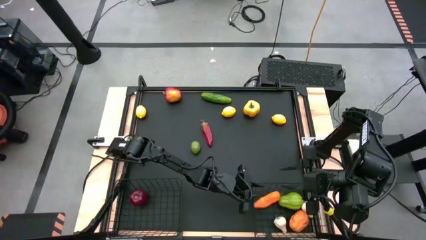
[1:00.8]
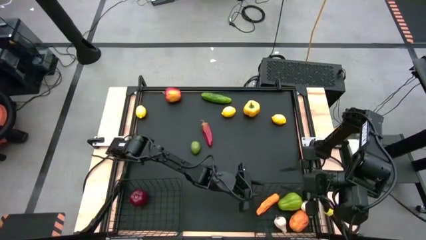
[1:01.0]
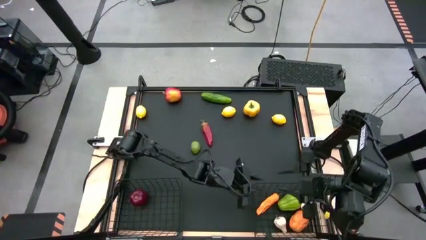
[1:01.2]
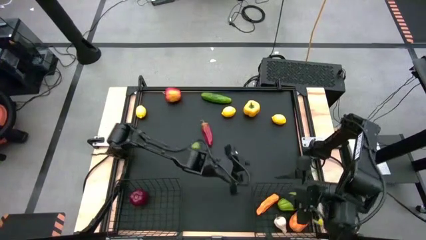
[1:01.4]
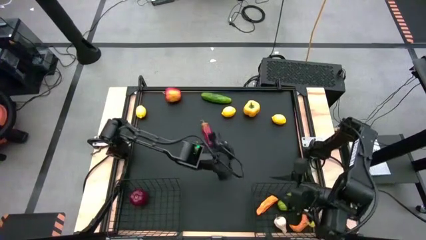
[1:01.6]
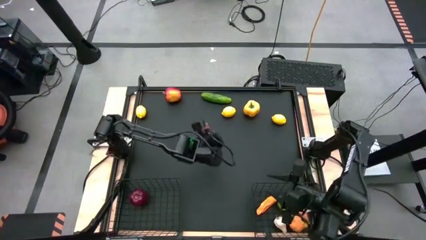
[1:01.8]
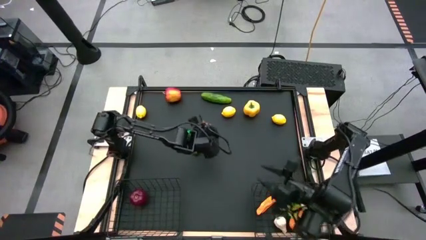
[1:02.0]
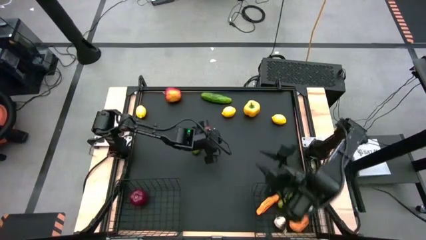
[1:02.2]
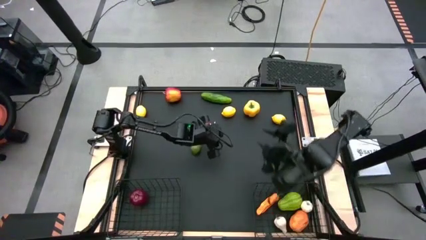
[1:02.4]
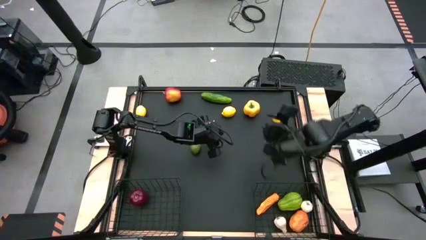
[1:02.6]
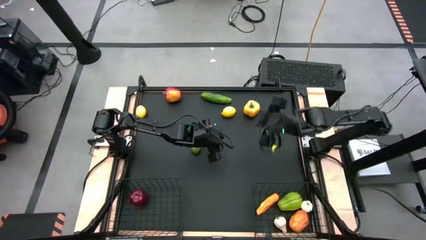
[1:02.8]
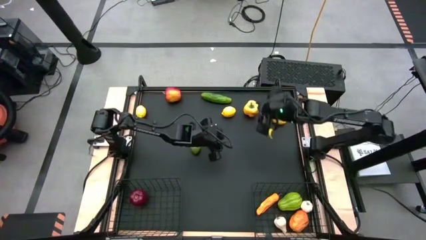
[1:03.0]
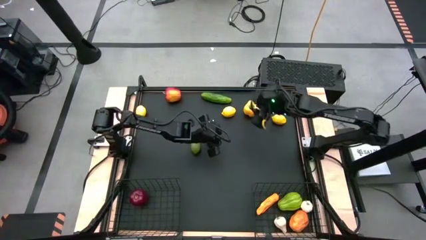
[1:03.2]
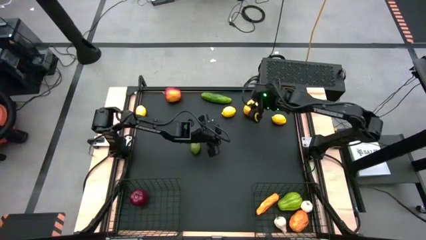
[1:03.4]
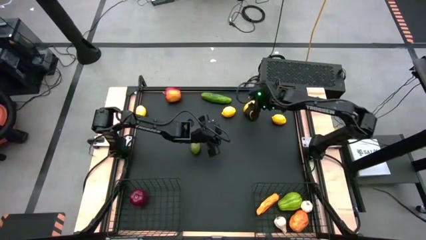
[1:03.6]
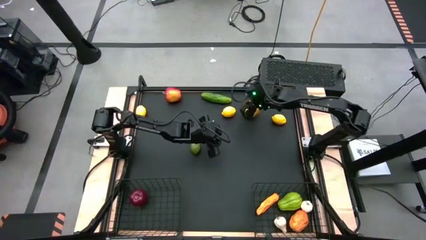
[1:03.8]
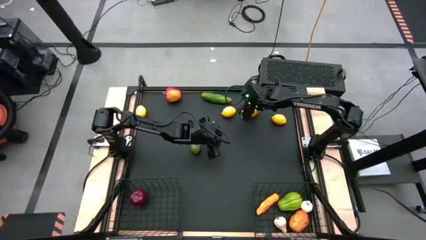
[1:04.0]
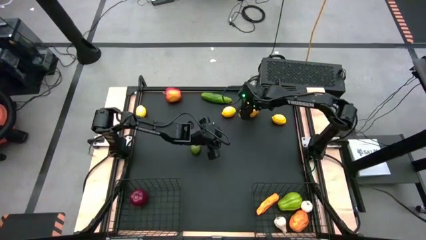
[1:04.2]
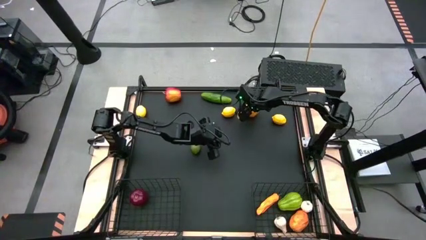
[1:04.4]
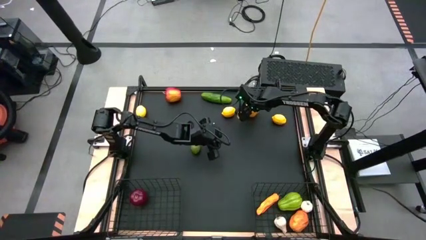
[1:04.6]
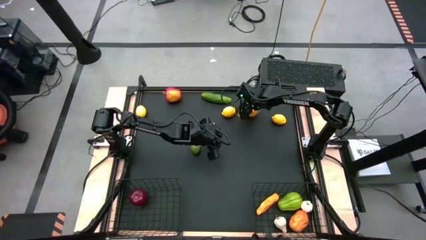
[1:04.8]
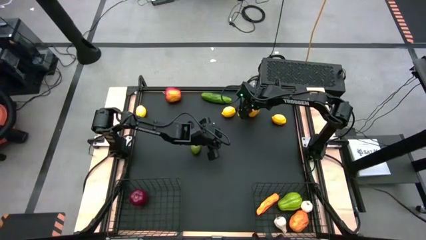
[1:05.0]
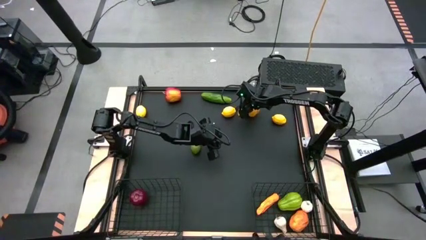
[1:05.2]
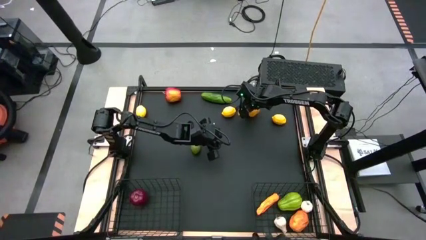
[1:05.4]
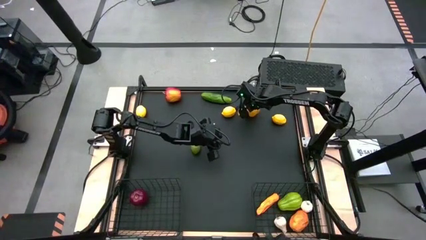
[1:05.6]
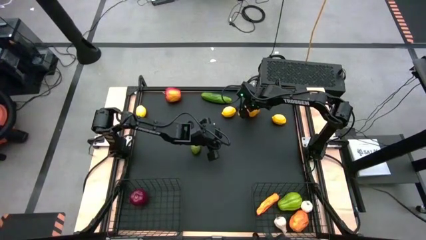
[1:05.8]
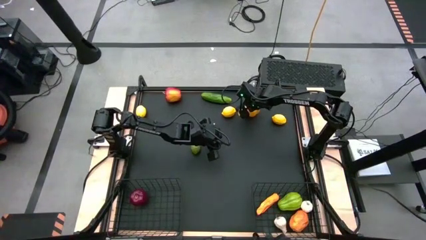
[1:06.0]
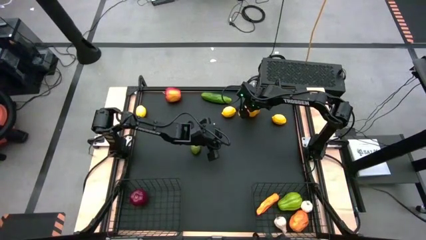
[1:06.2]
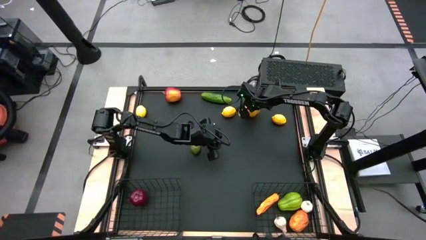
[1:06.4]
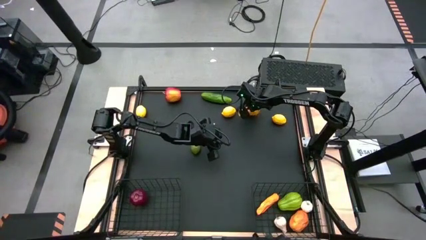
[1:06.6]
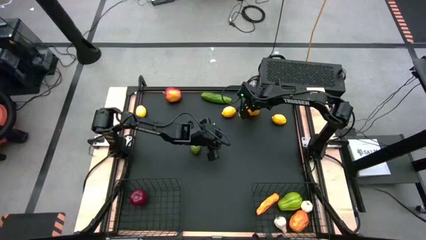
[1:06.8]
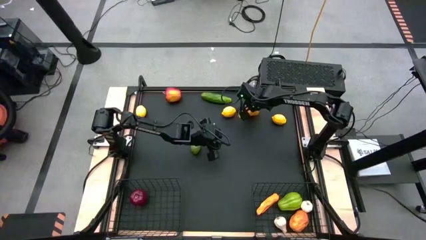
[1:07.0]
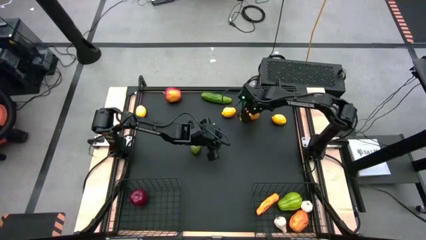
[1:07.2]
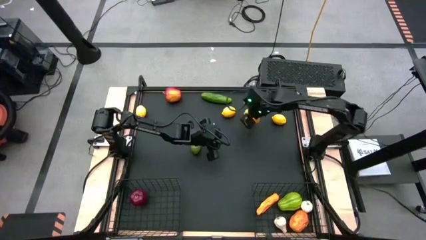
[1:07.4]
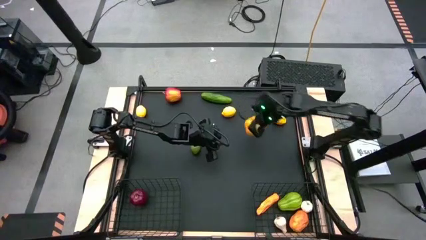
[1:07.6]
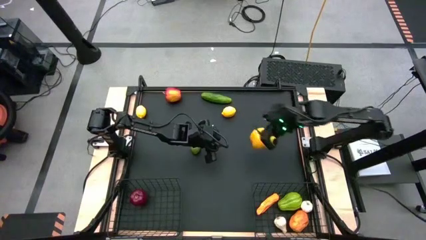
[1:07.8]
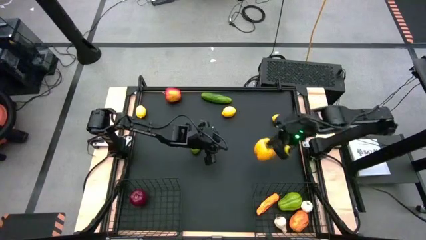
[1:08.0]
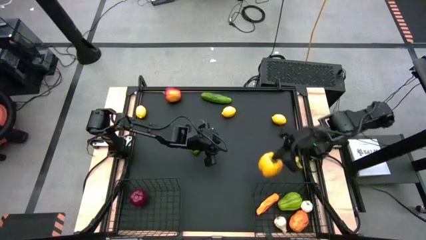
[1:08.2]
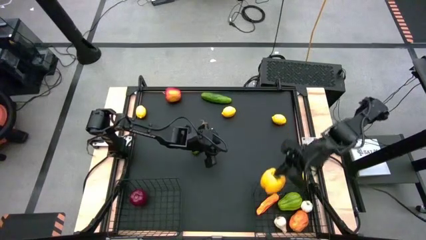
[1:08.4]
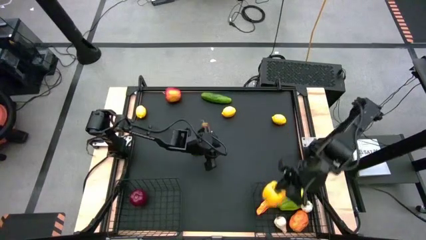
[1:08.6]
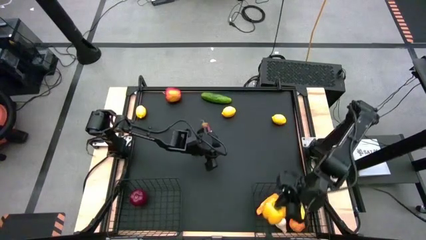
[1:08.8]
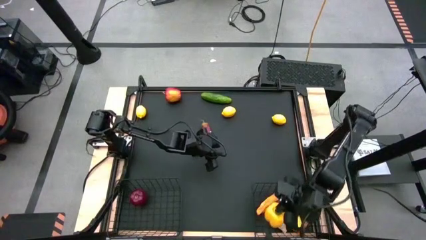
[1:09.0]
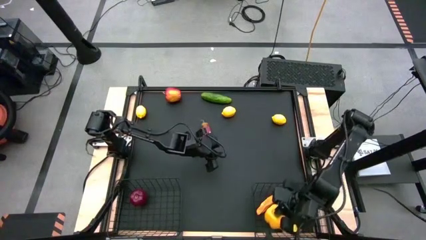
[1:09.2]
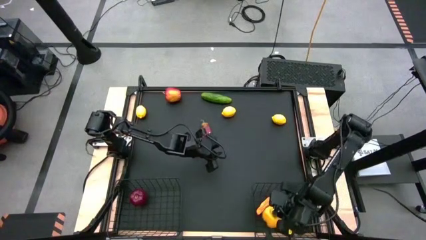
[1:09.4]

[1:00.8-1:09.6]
Task: Sort produce into baskets
Put the yellow bell pepper into the right wire basket

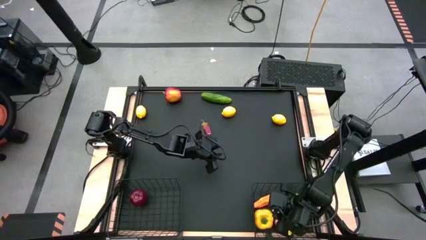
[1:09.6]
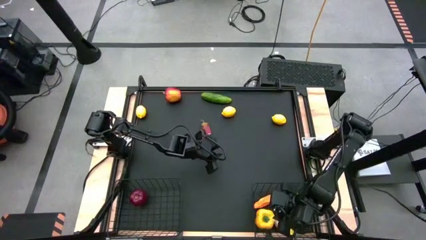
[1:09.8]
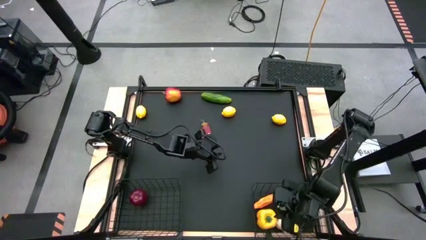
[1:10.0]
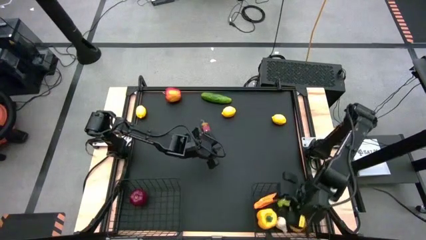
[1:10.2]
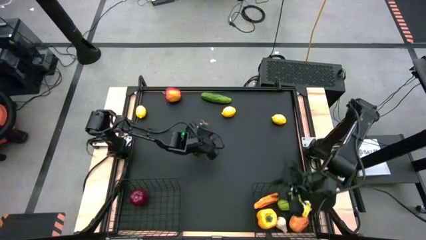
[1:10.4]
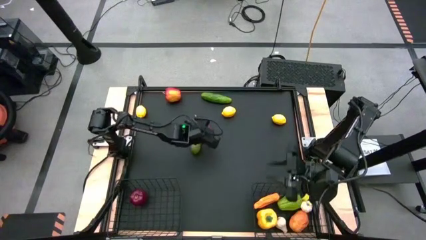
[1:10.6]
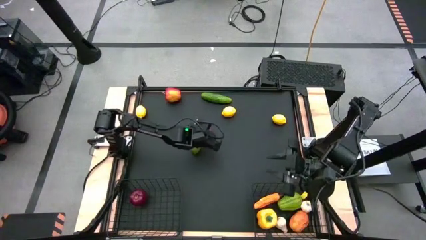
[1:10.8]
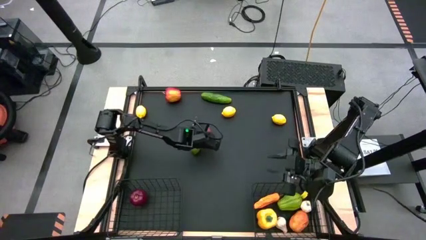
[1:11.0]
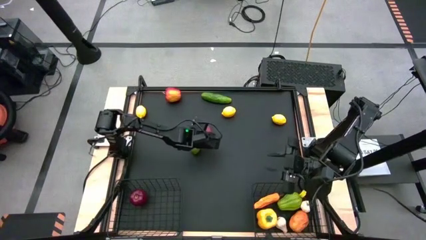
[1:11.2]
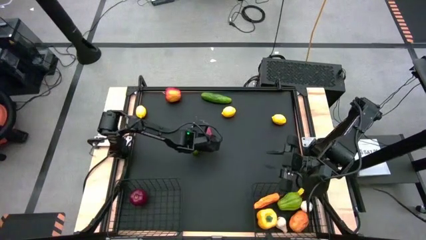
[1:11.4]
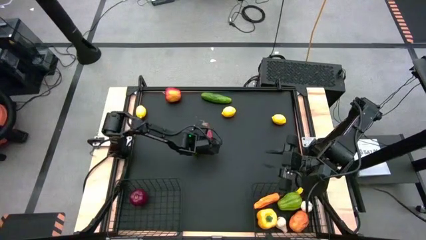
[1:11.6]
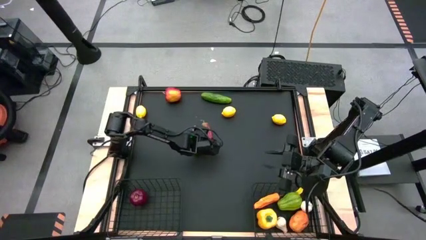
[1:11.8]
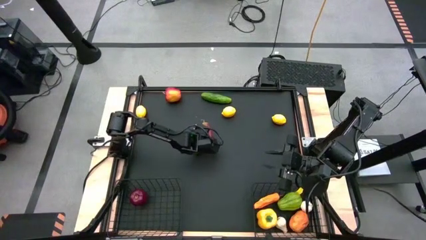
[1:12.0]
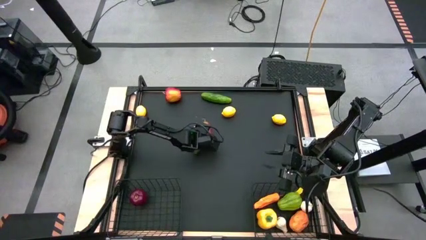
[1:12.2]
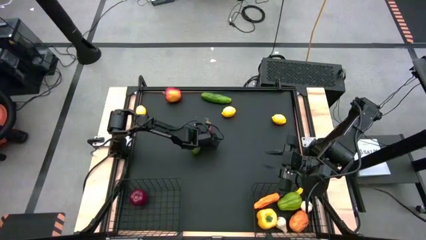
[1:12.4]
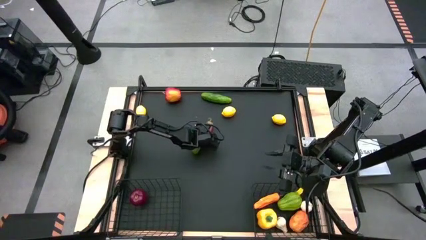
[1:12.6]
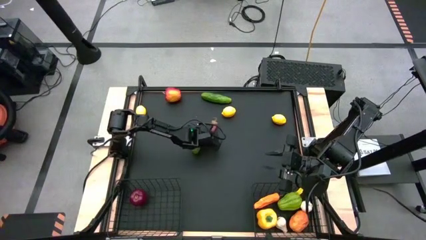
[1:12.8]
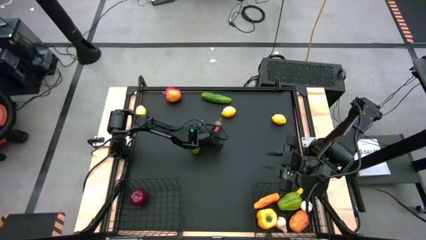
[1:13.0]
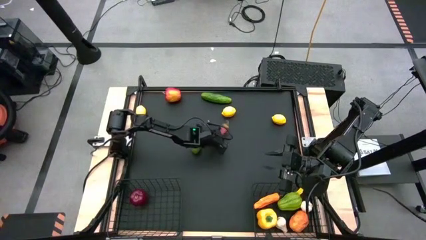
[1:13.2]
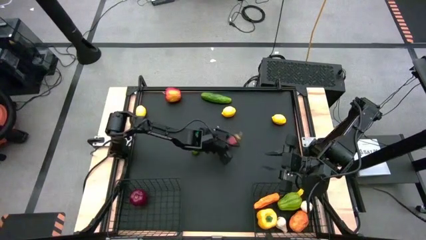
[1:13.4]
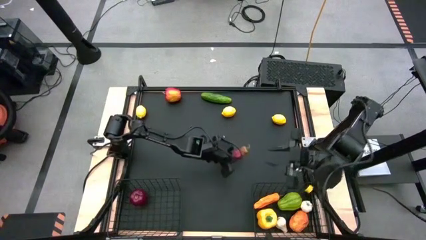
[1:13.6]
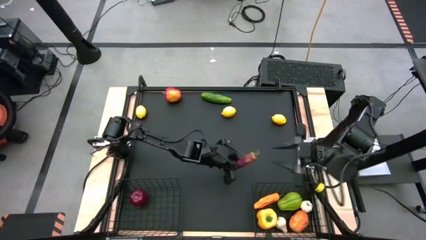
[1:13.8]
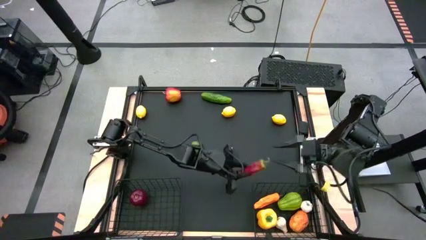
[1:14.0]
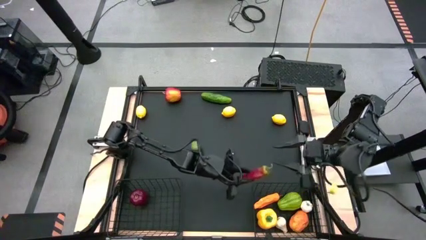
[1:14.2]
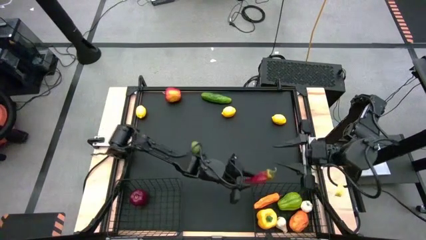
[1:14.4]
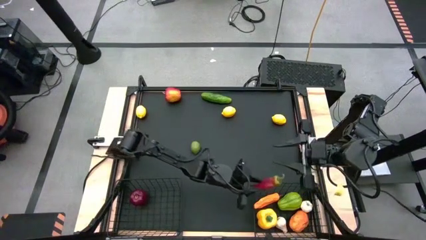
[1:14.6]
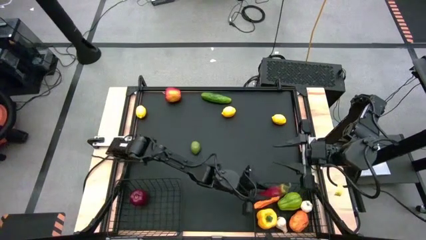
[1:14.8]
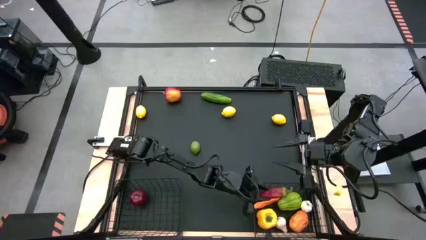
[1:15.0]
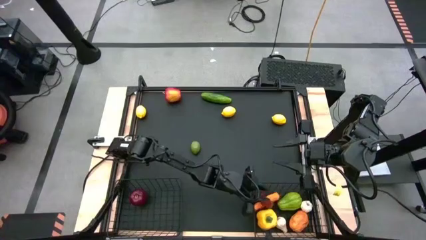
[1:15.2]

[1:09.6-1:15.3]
Put the red chili pepper into the right wire basket
